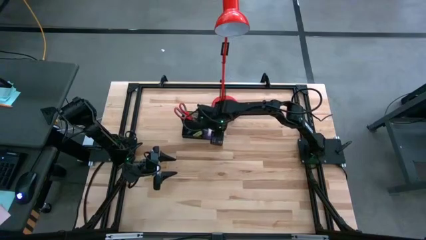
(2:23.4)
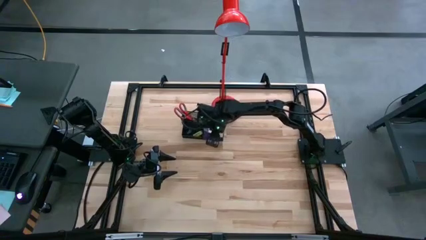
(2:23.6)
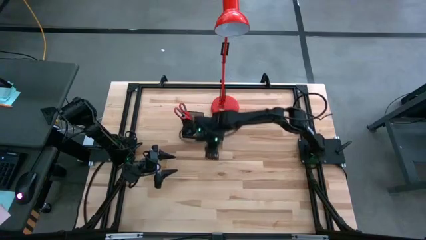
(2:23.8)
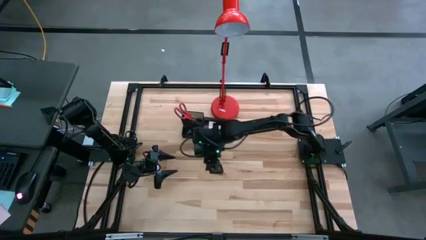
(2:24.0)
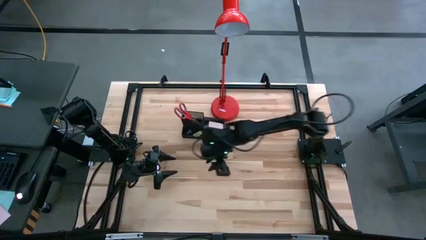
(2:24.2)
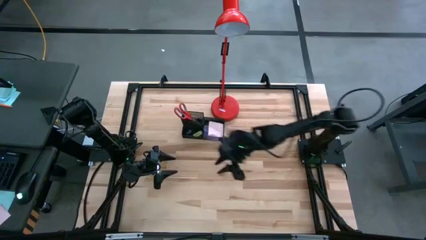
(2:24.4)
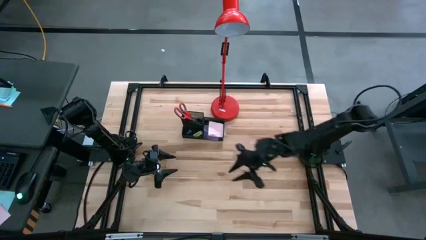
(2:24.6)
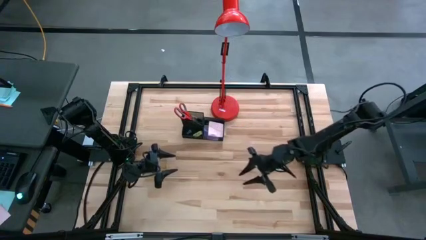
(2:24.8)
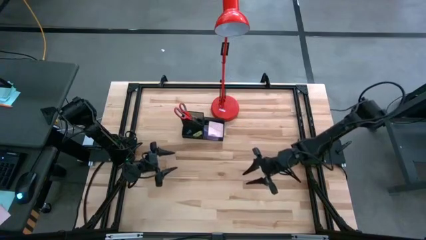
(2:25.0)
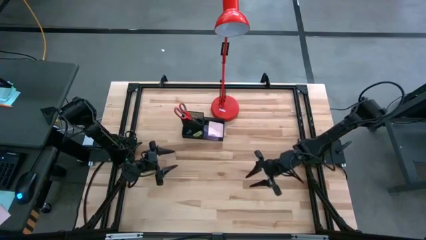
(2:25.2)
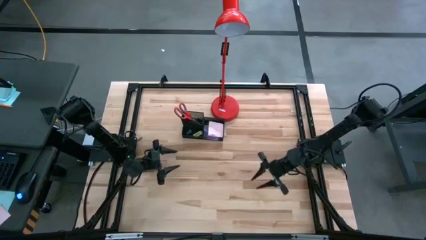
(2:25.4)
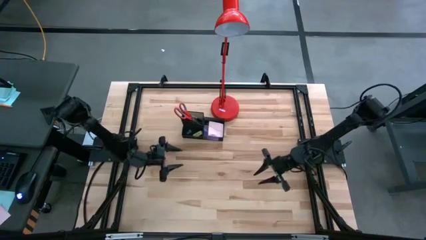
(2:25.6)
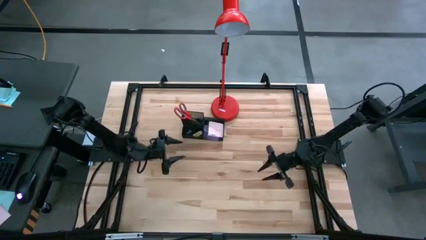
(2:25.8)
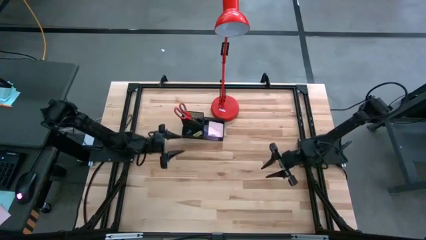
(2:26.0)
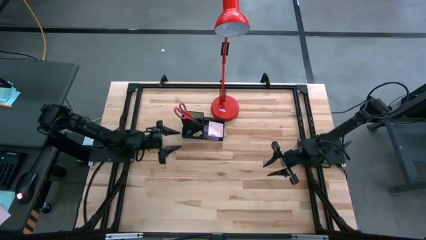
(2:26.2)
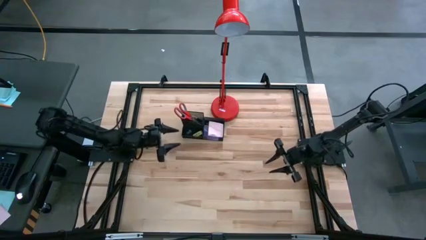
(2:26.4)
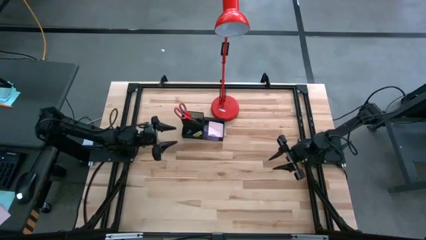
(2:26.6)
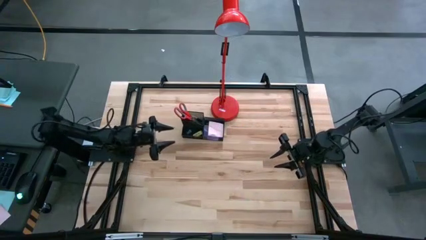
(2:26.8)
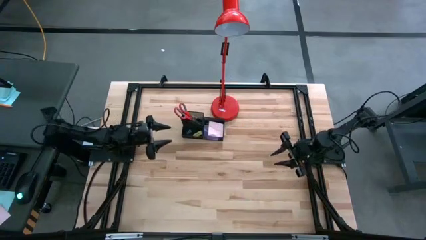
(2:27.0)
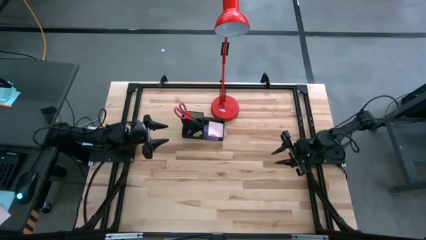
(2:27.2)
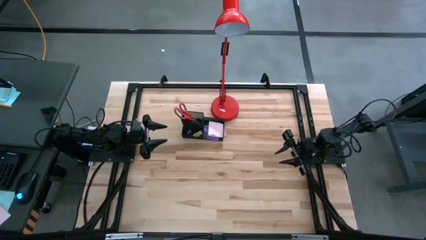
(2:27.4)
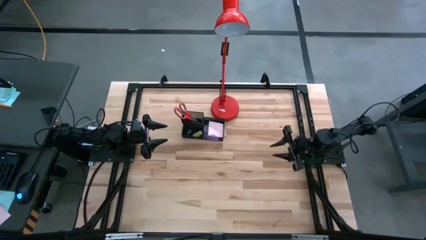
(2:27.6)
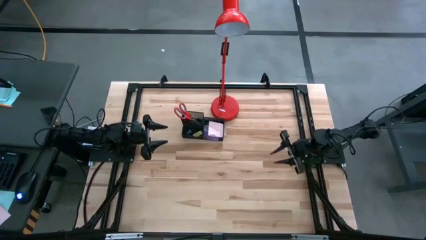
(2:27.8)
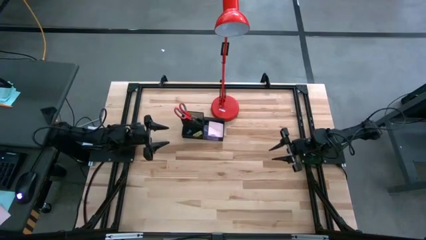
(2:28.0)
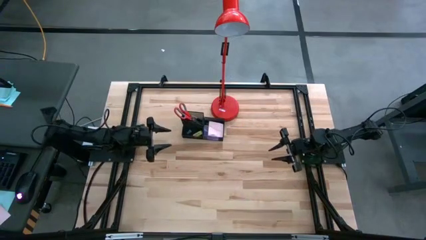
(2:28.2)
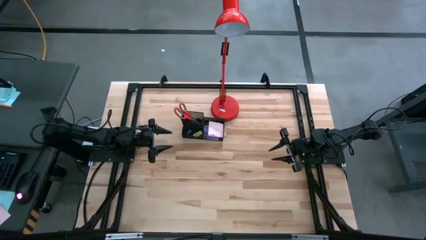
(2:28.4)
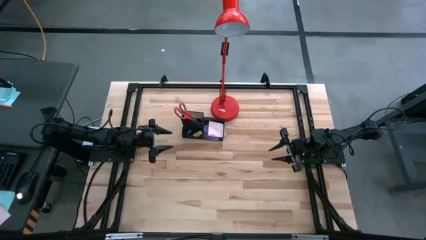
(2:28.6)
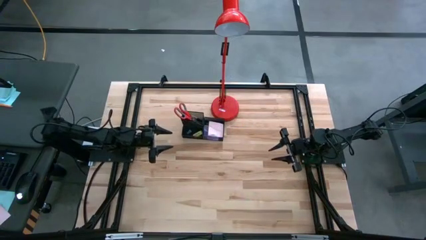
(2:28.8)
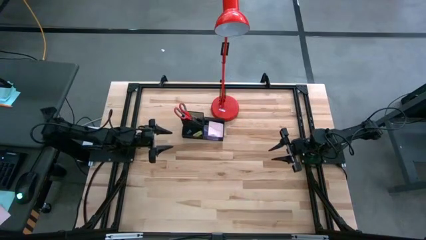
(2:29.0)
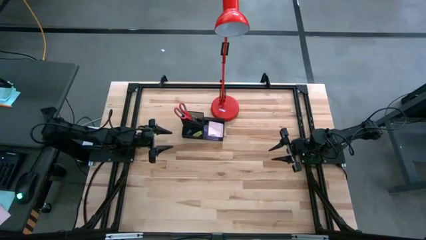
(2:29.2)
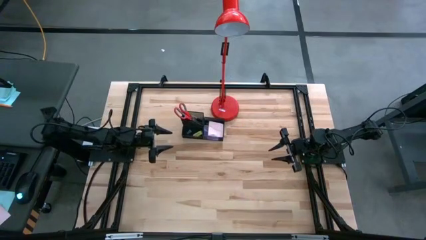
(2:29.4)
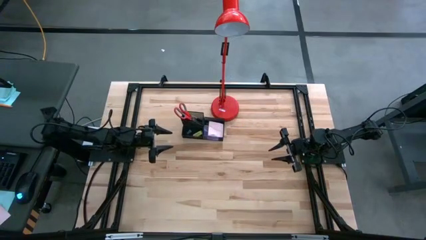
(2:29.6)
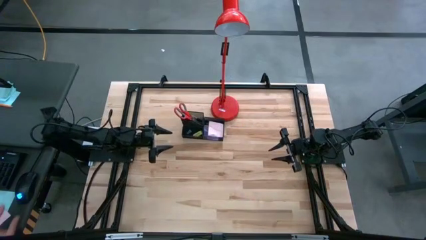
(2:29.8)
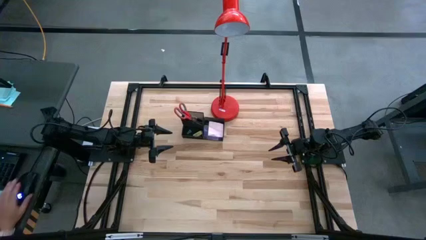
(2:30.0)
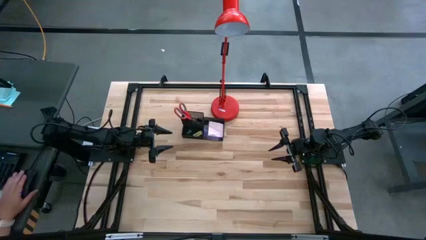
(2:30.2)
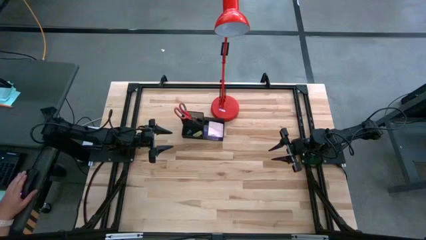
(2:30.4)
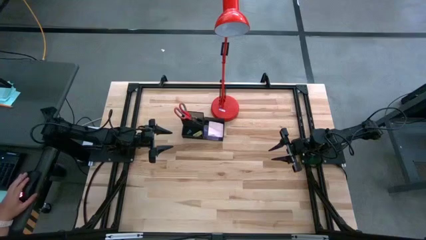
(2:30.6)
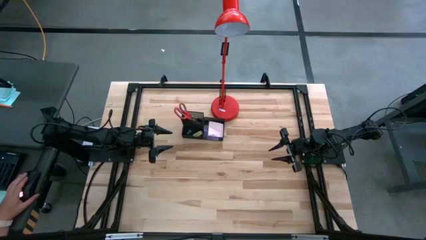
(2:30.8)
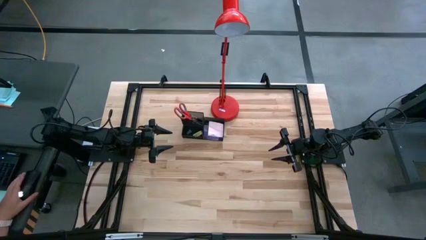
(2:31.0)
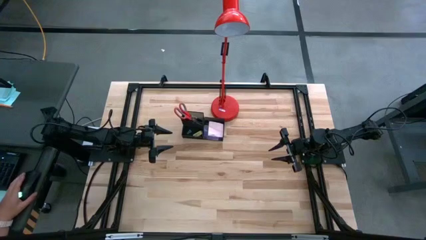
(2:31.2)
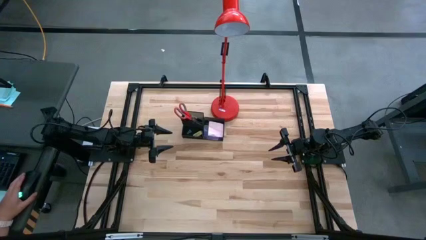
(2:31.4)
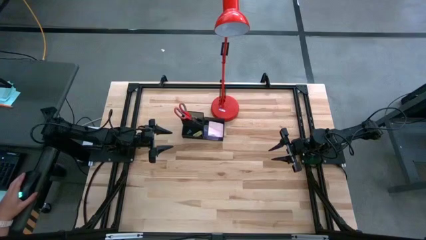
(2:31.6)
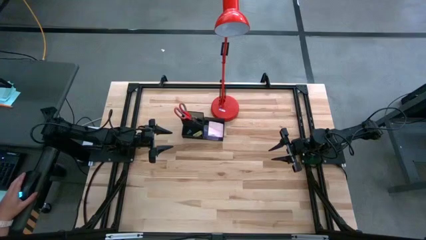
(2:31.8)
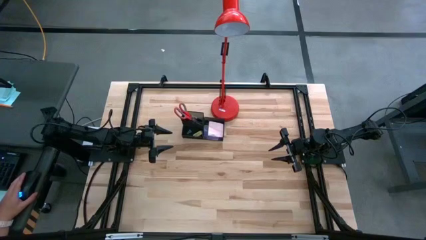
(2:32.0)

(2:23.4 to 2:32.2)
Task: Pick and place office supplies into organizer
Return to Home Position

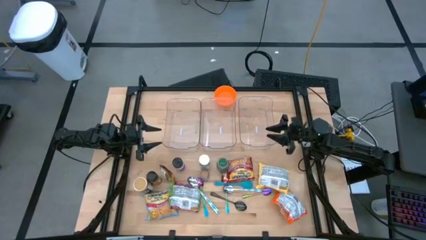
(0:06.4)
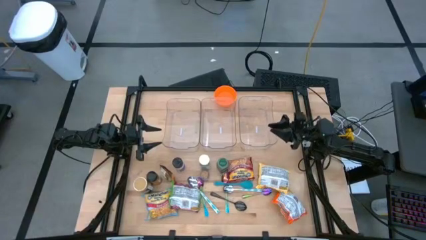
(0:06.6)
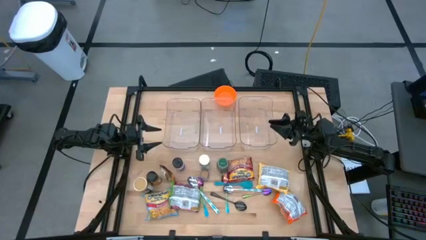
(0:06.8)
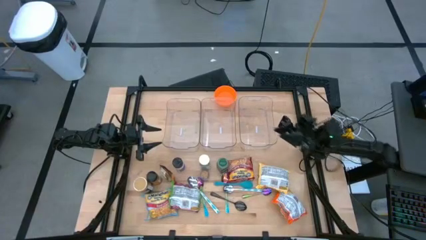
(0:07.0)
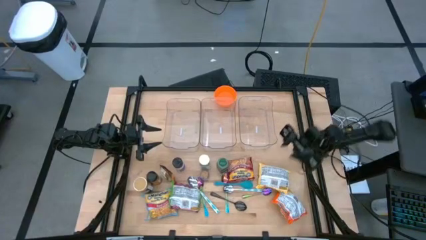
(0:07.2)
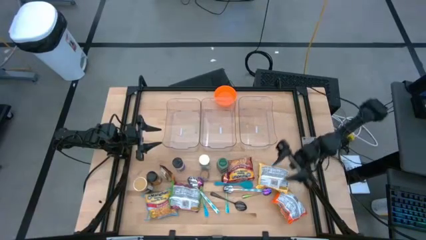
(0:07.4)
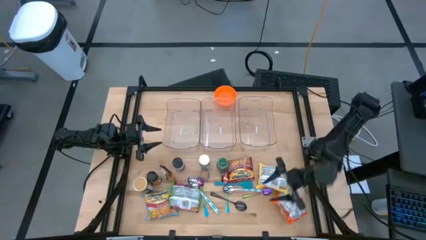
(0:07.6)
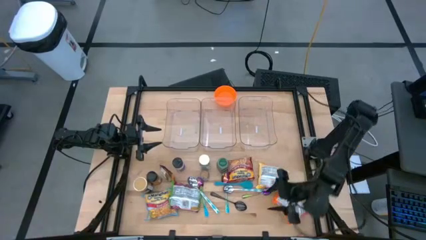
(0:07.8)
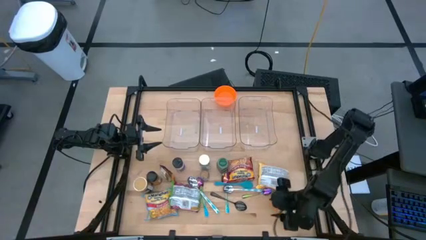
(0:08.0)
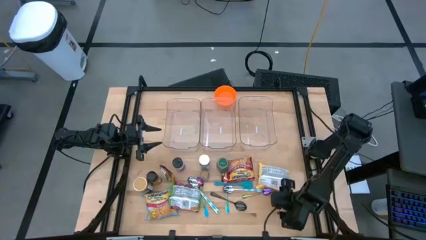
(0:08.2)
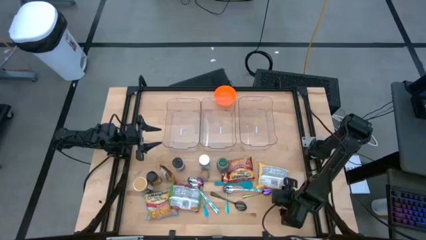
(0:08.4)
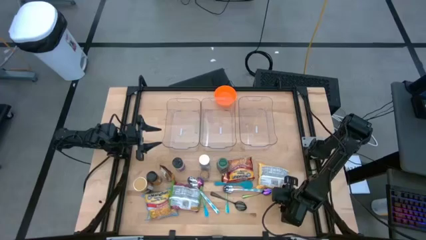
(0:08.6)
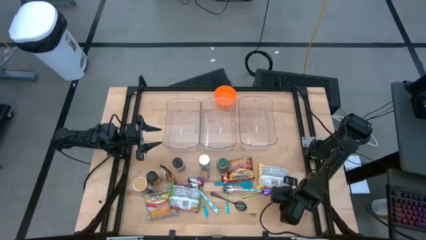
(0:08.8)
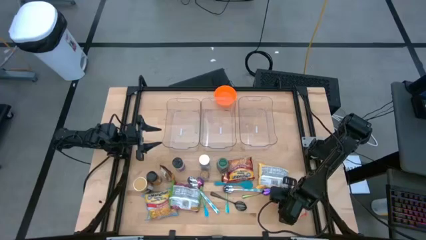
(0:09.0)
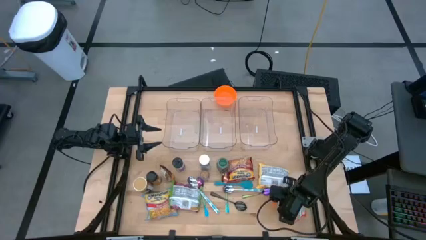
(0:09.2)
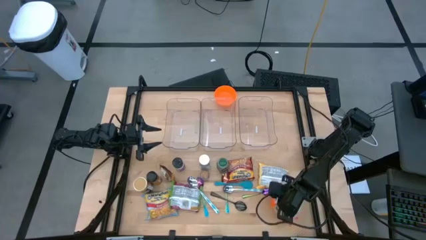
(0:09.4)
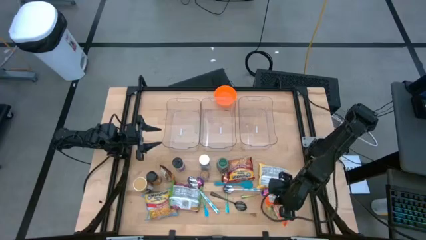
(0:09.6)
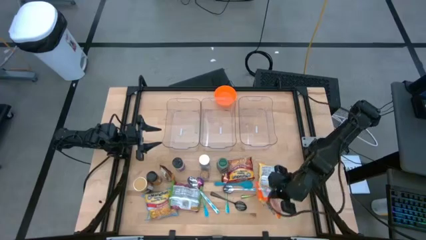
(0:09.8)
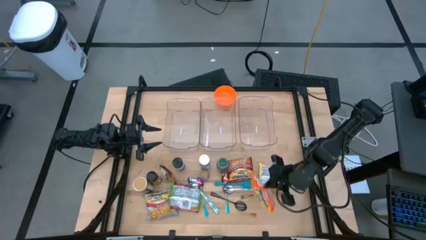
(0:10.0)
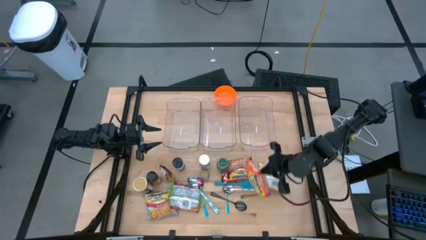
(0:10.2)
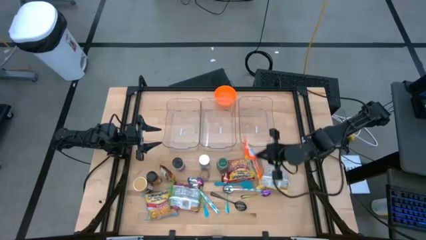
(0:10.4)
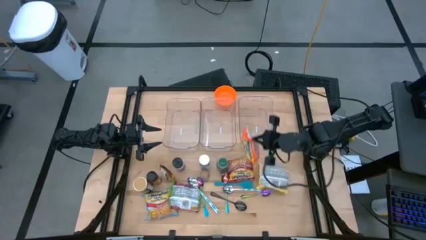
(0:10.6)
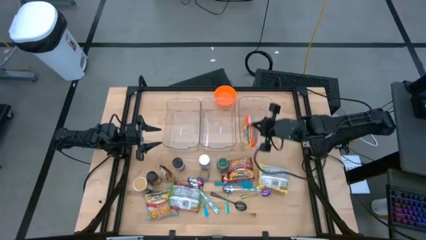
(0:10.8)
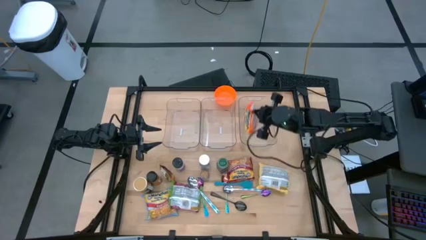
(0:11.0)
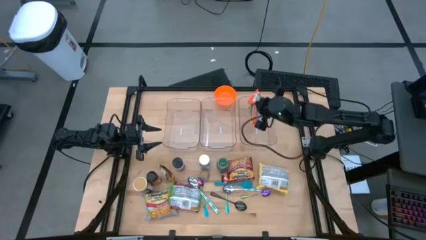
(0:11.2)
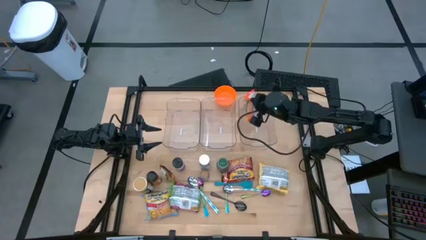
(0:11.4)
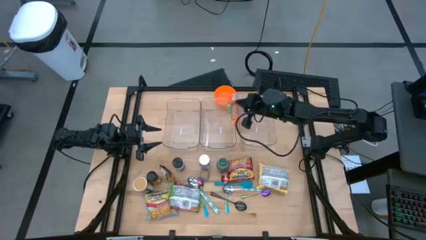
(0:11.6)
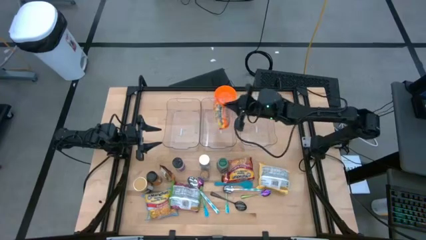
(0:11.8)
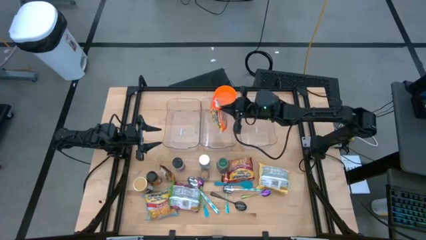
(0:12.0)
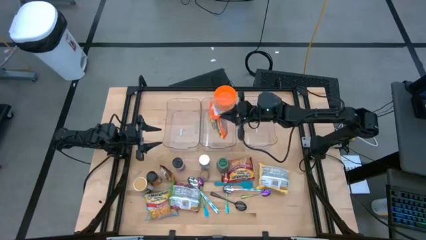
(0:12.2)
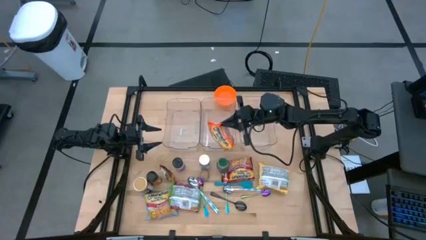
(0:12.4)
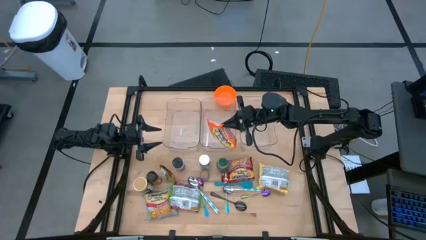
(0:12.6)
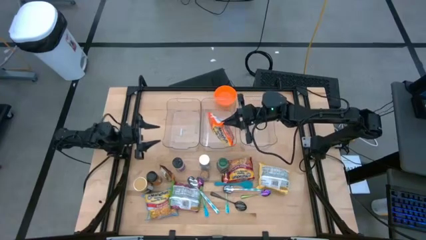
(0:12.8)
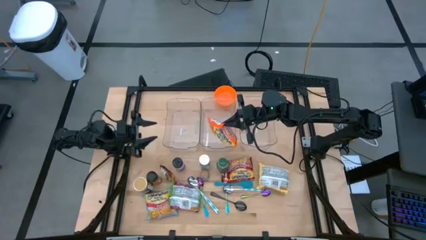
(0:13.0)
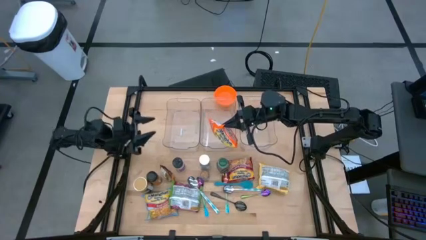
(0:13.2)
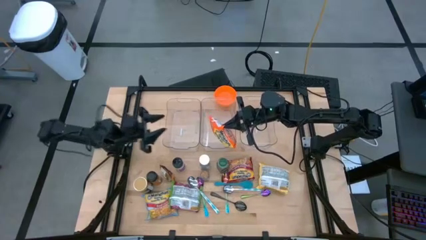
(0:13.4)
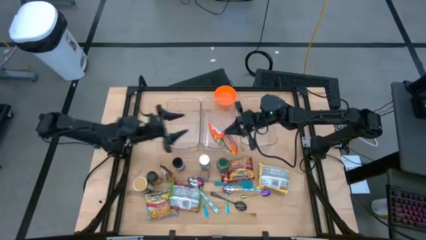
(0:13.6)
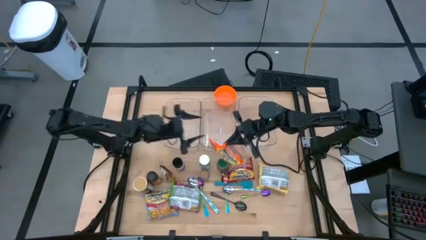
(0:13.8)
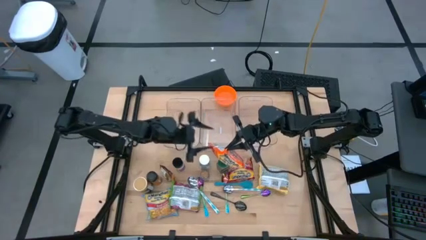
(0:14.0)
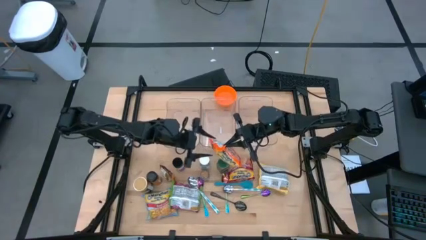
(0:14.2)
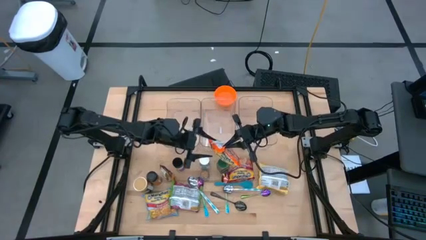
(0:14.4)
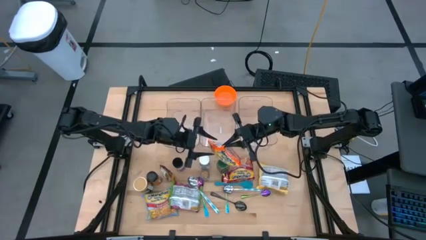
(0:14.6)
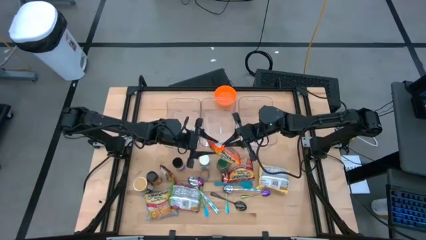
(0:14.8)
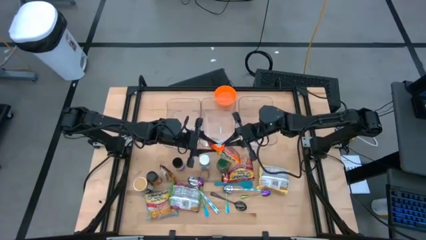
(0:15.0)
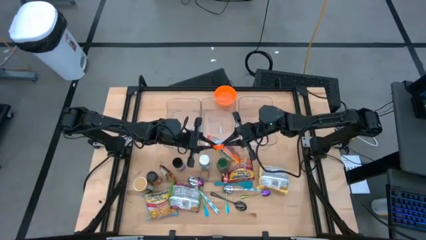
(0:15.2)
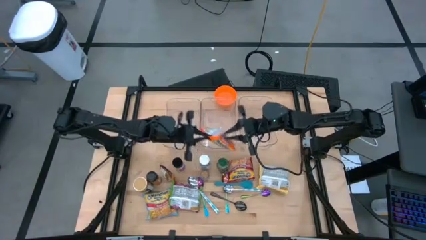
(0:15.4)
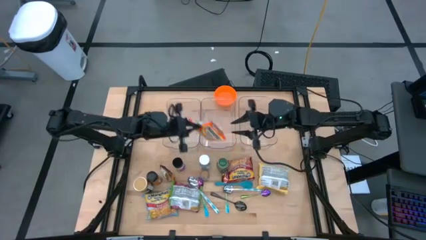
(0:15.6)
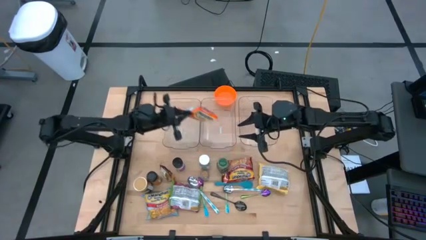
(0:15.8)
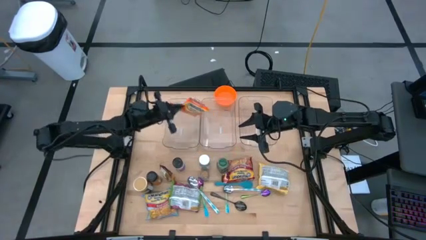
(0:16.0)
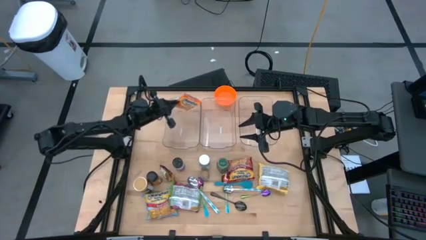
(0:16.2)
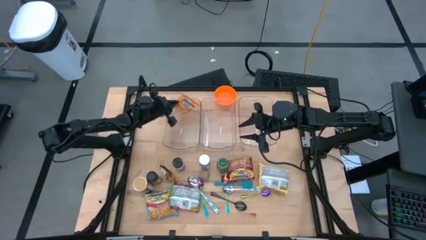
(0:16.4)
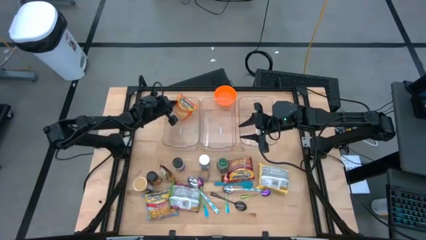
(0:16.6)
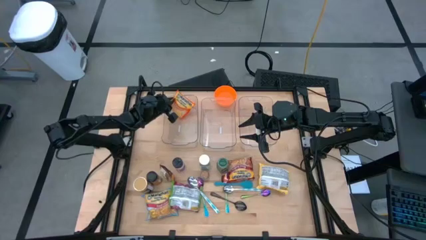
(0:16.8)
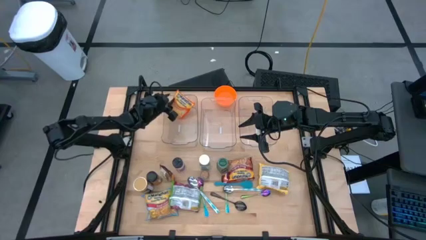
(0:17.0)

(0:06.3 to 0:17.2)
Task: Pick & Place Food Item
Put the orange noodle pack into the left transparent bin
